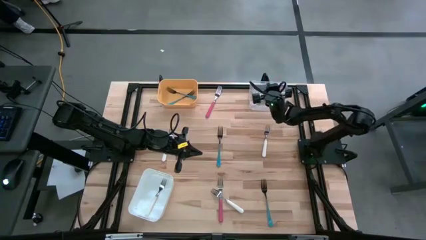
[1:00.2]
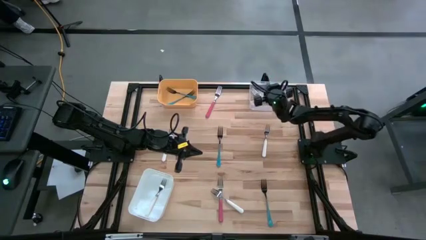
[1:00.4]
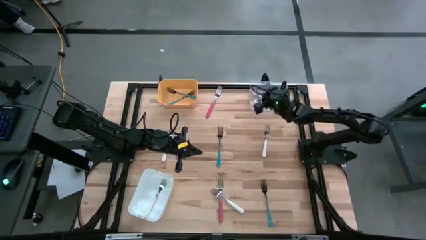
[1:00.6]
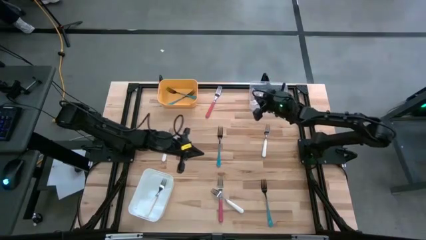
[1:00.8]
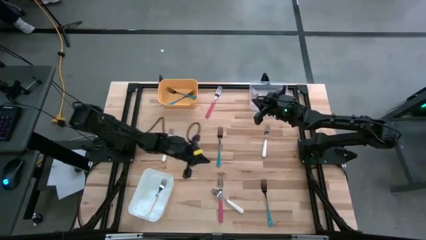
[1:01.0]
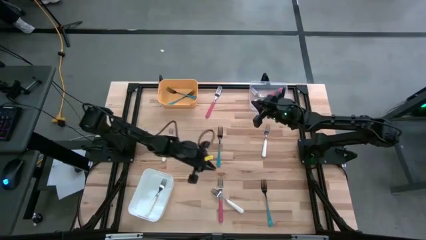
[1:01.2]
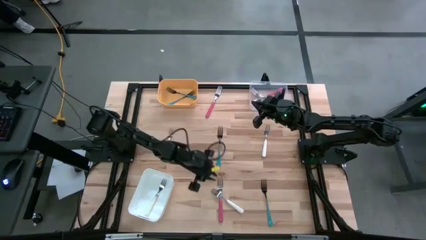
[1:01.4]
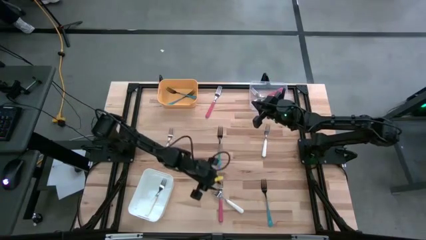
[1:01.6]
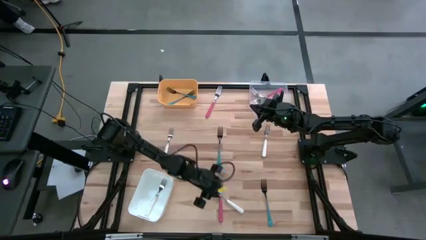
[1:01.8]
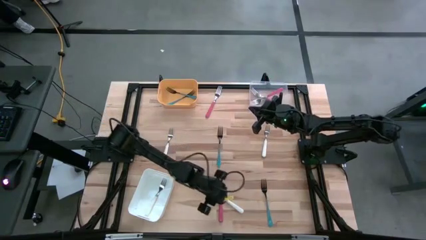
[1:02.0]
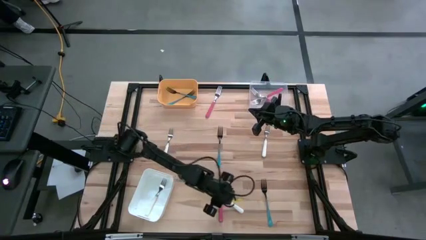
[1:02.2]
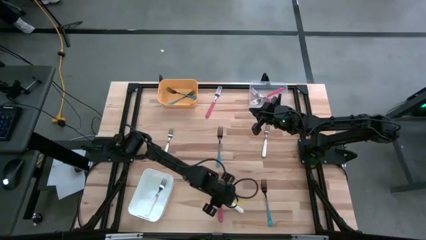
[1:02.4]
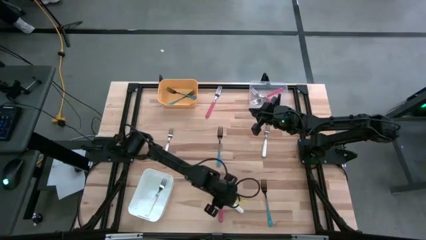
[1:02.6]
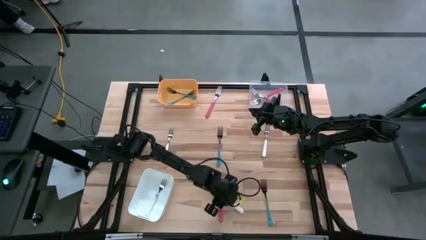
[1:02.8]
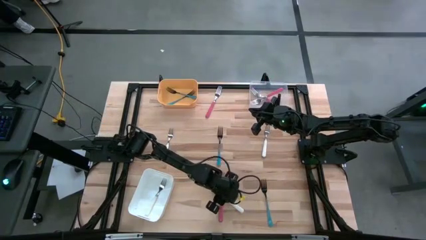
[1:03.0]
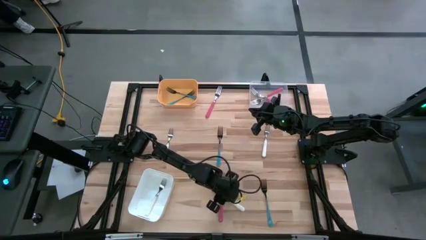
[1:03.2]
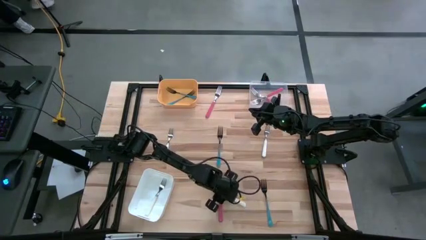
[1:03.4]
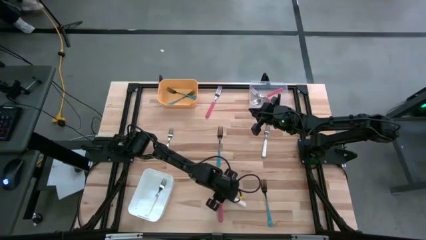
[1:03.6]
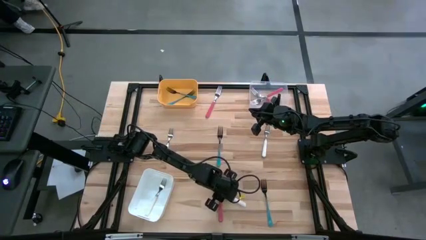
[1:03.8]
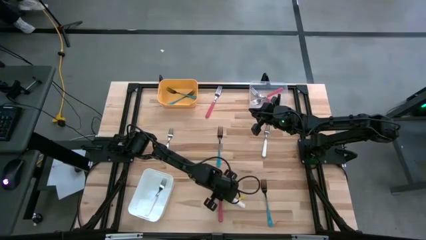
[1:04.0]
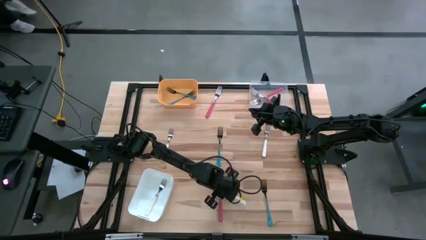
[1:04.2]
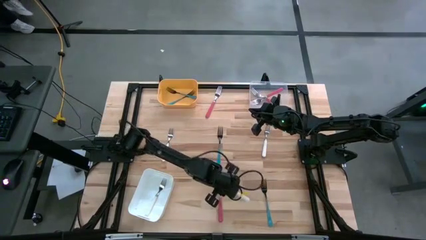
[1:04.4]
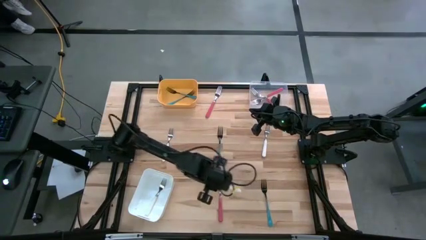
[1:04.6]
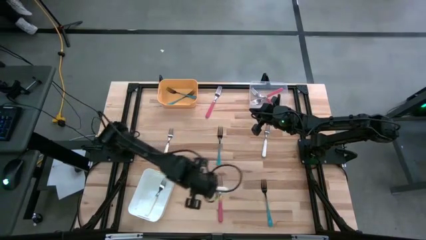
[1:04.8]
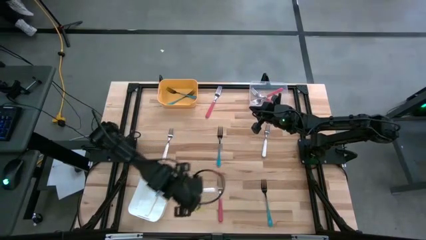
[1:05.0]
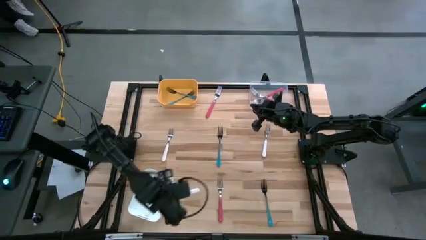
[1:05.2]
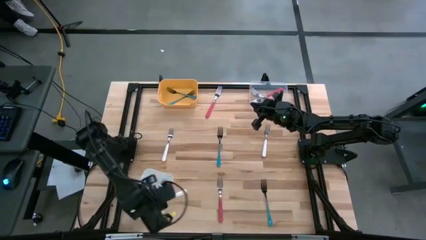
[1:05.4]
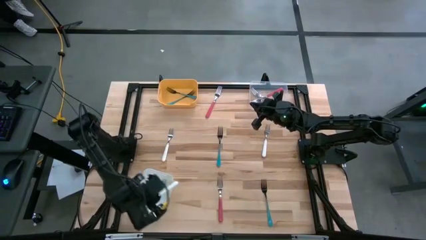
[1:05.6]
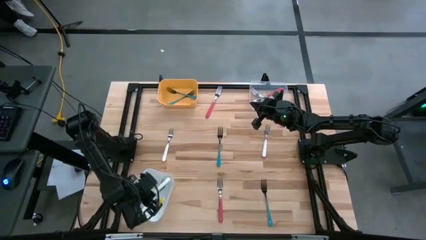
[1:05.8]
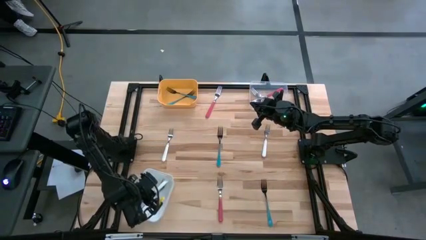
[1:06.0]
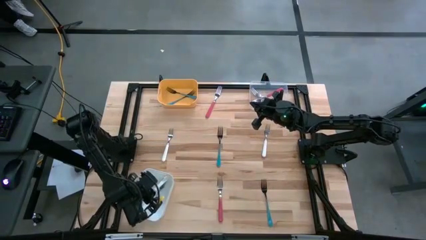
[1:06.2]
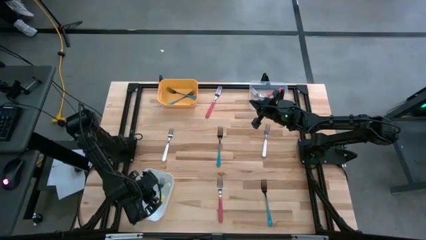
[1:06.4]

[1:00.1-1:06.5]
Task: Sort silverware by color (type)
Put the white fork into the white bin

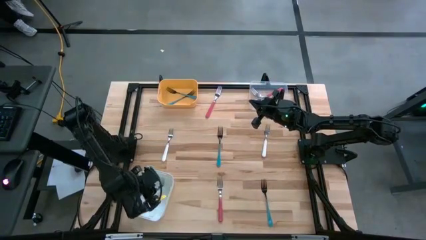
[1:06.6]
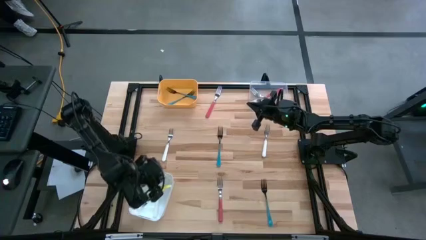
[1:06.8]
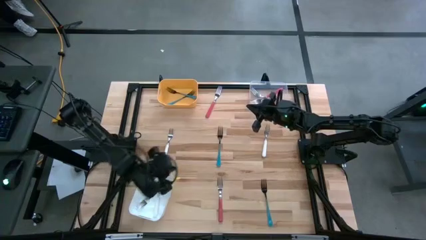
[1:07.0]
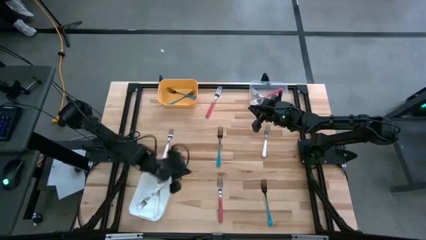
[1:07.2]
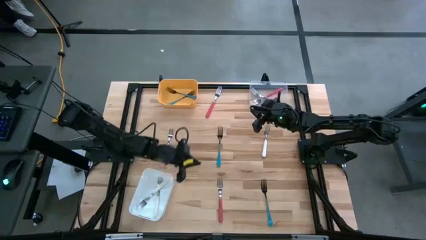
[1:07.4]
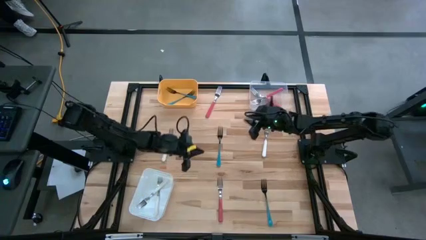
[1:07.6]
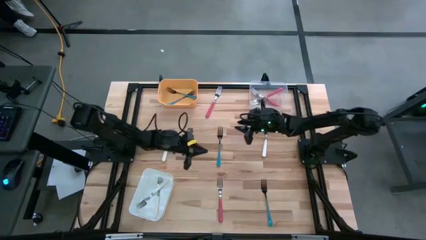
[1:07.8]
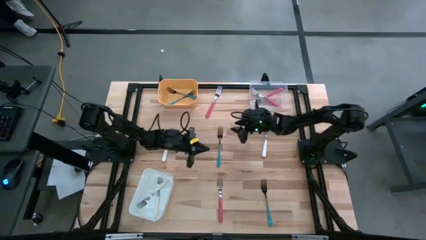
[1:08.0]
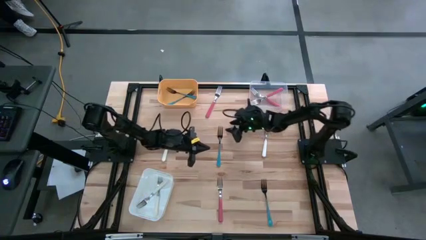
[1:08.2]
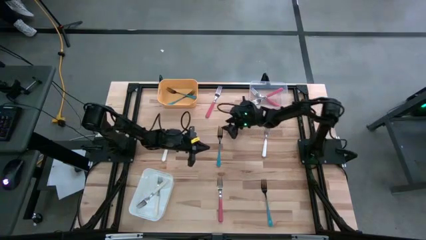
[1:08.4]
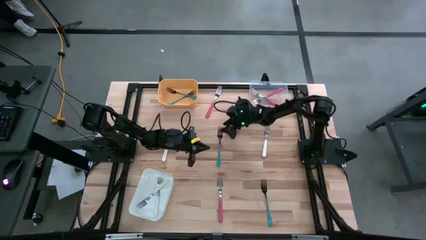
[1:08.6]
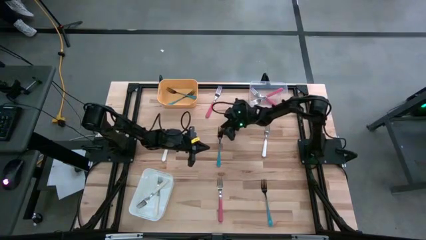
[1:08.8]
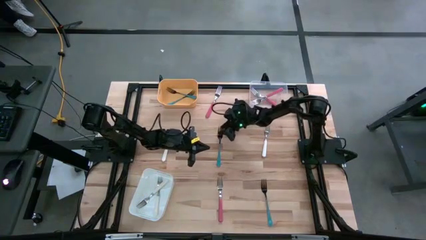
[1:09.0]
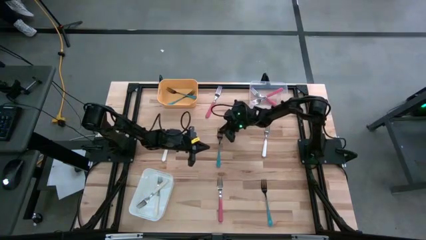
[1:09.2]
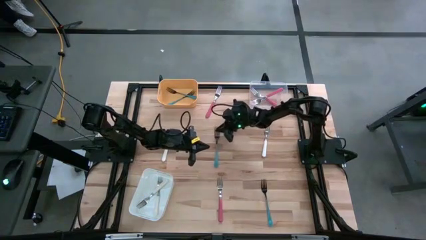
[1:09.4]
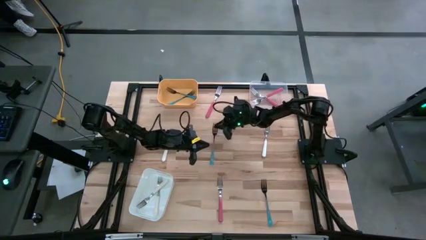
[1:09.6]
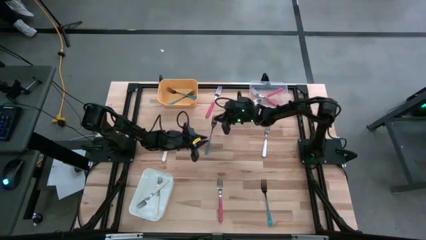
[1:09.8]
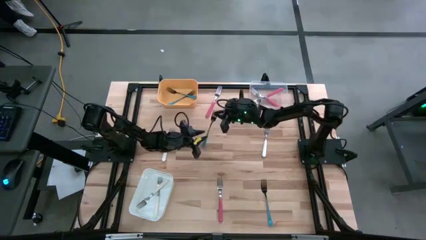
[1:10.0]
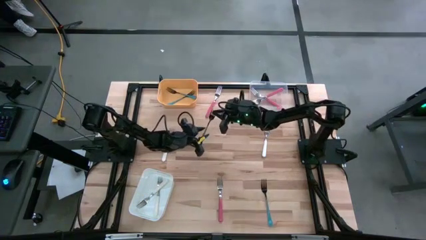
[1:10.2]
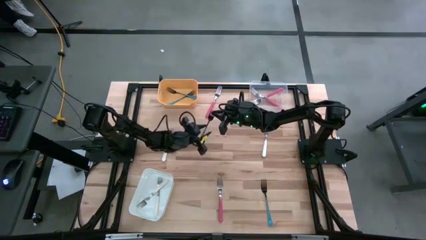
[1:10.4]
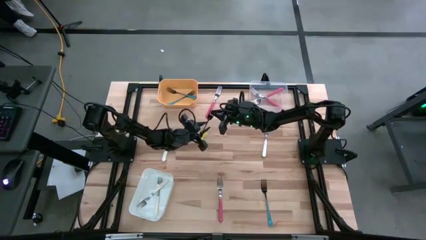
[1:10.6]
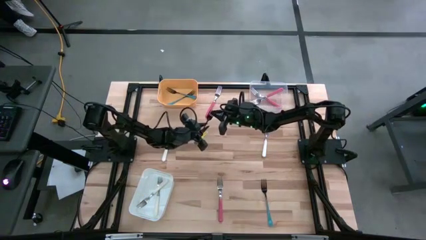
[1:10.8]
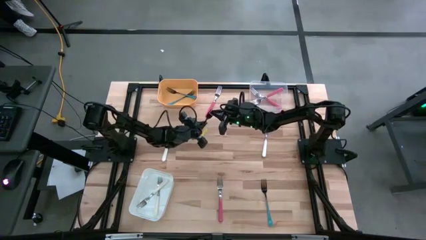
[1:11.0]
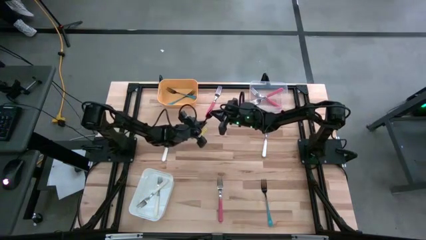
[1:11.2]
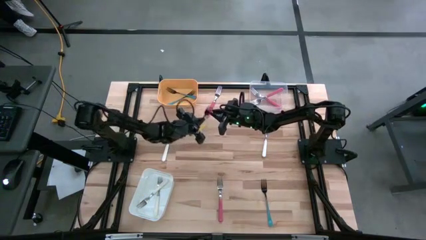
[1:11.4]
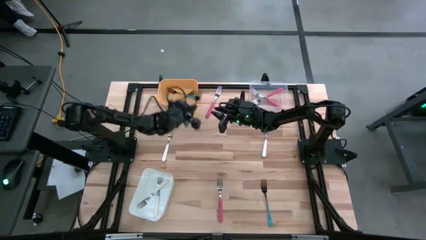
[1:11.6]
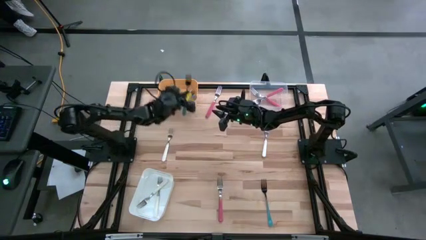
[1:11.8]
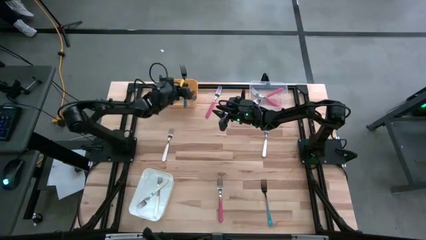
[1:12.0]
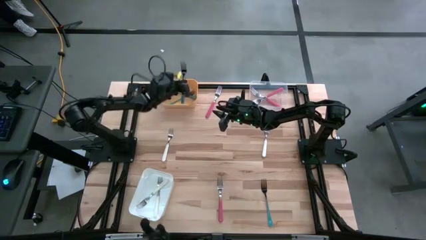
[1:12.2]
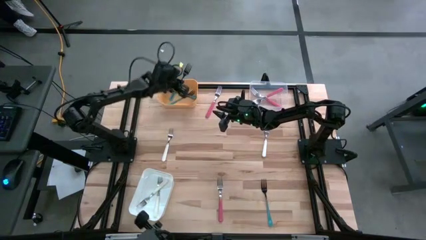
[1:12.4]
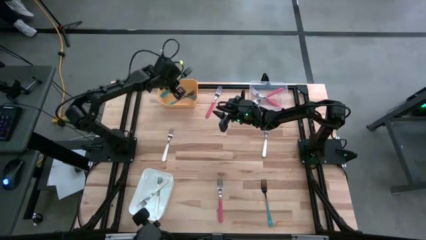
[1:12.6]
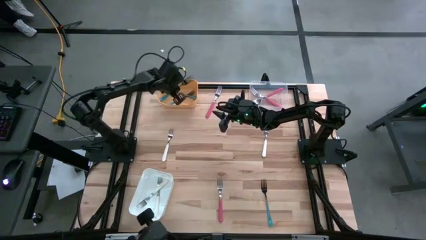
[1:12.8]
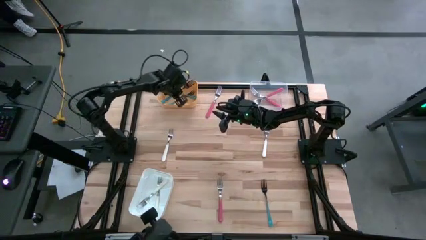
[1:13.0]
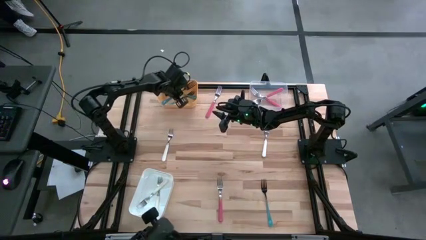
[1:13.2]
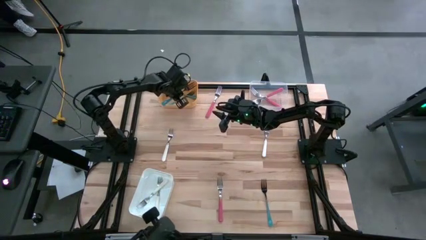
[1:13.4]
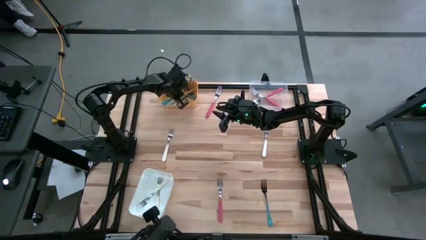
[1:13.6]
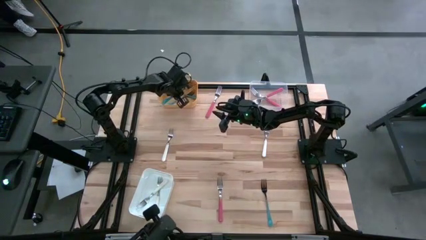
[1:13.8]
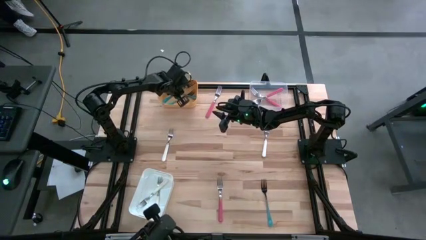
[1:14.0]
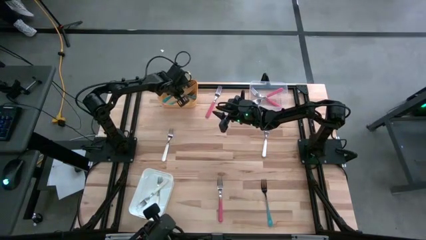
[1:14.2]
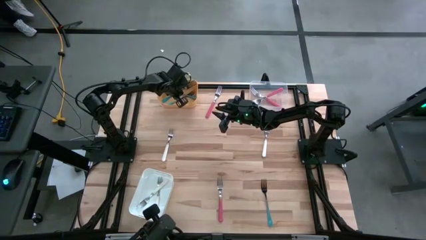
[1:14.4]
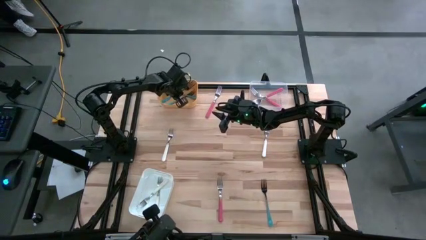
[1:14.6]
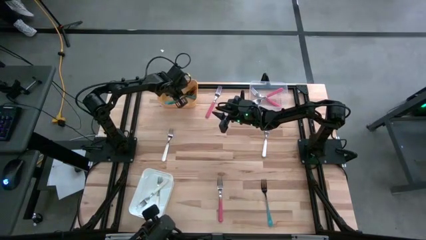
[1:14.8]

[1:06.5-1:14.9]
Put the blue fork into the yellow bin
